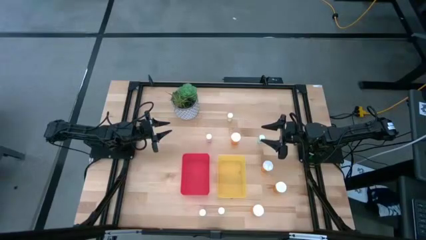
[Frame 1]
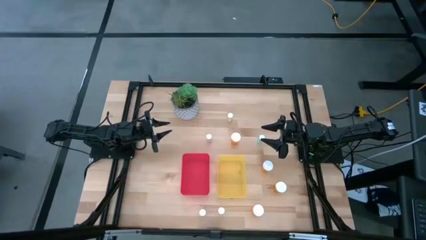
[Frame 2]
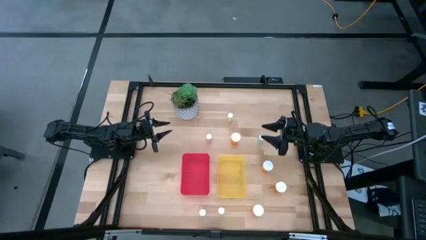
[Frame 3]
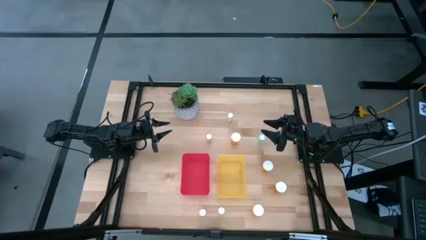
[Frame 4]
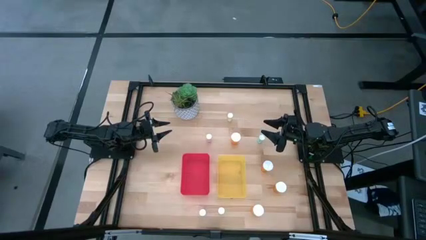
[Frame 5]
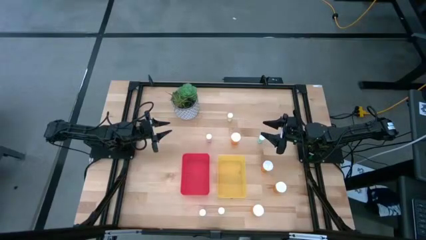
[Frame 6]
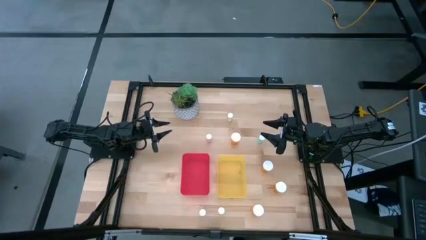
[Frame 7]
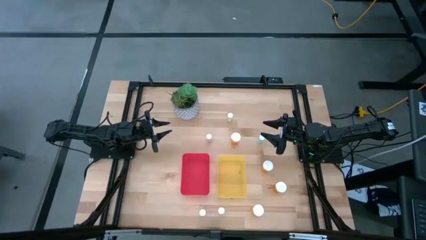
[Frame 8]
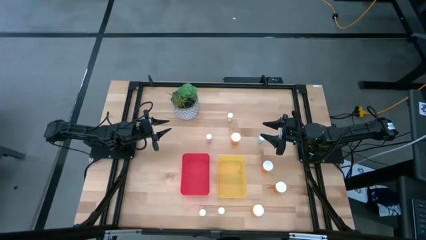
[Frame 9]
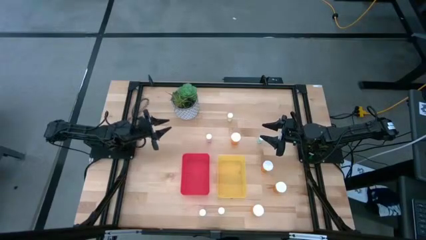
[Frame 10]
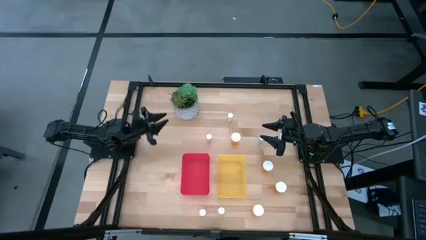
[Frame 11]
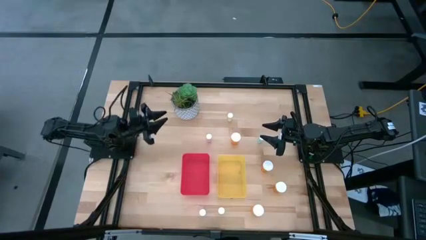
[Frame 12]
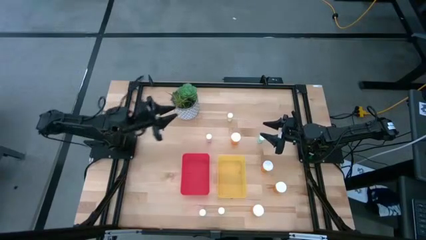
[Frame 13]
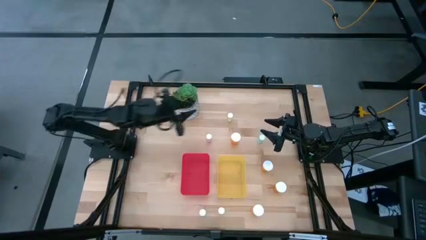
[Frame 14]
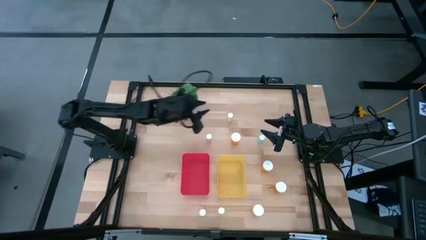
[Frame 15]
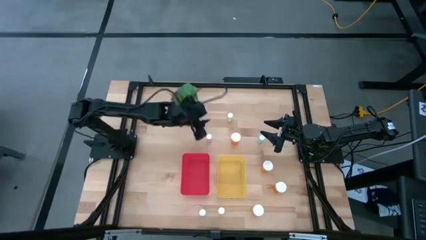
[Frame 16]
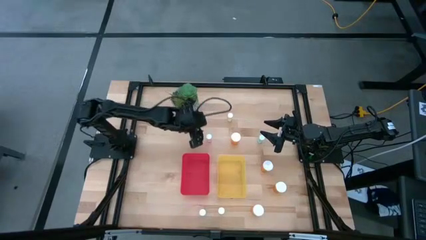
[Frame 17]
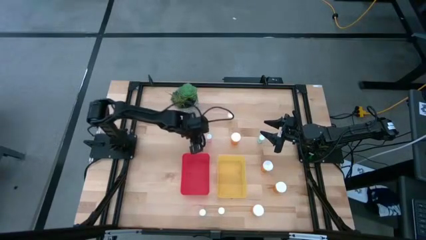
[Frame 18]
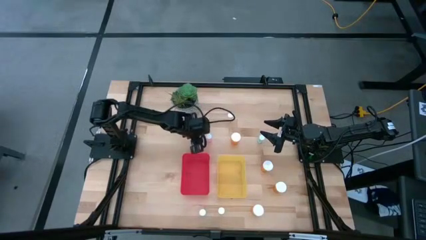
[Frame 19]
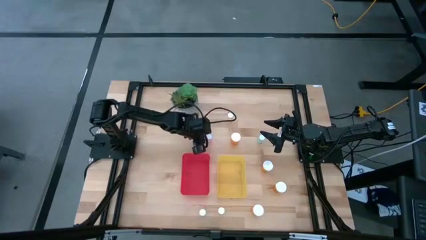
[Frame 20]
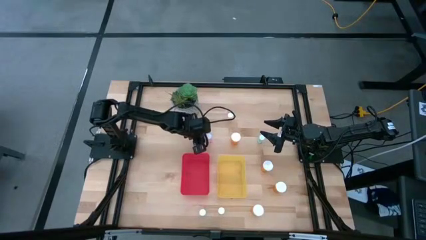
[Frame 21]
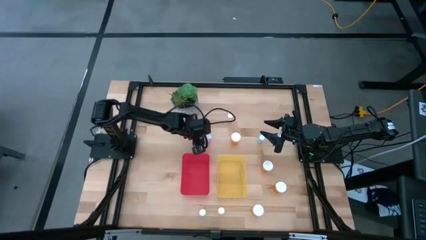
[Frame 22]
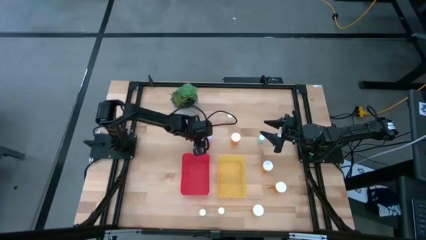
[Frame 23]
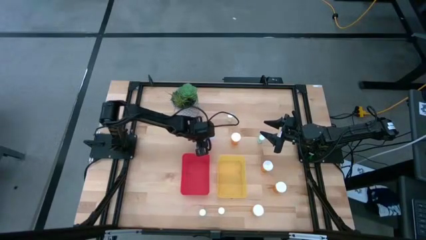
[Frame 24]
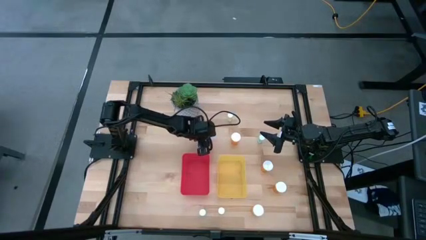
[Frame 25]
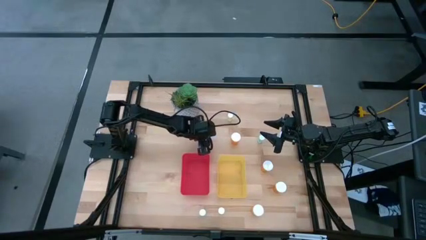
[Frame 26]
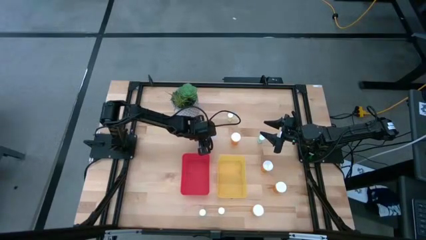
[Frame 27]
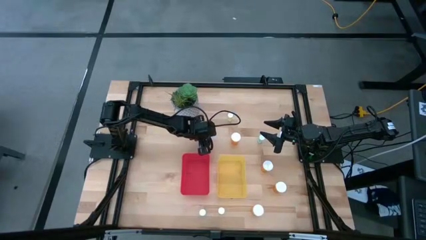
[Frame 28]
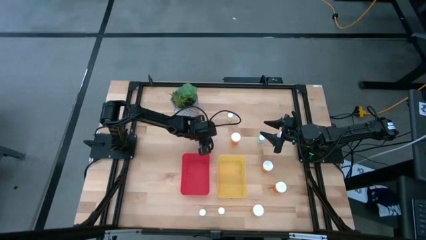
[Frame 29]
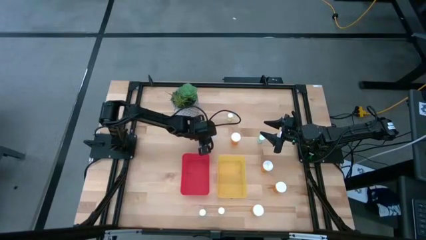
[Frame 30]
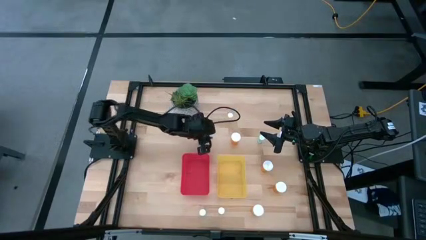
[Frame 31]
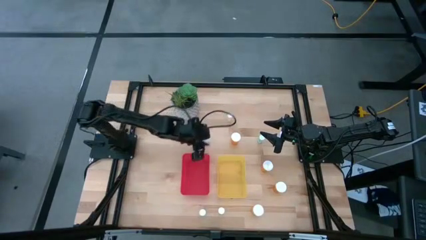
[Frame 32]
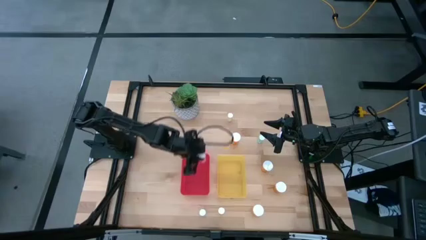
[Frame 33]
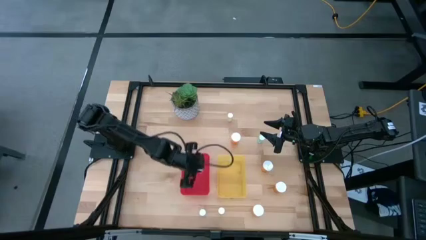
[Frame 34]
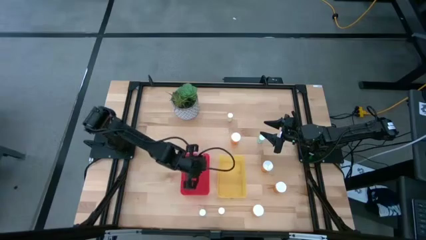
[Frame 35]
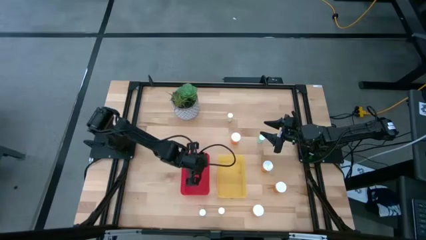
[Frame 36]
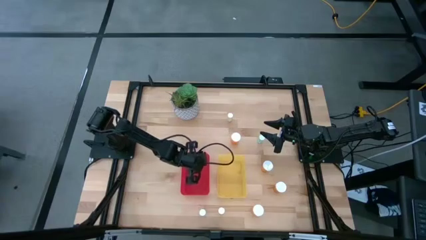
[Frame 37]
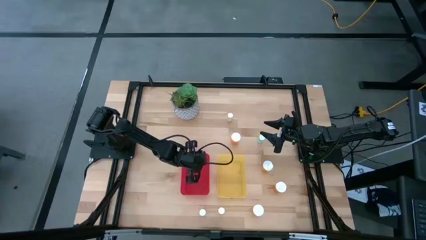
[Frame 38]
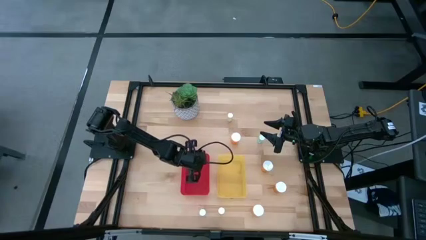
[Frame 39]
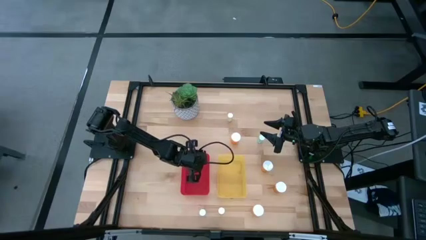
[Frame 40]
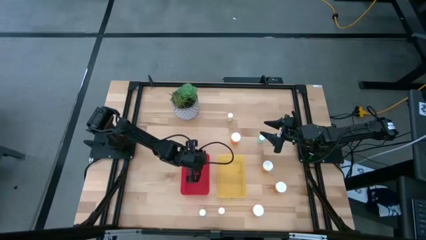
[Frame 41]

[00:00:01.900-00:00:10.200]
Task: Pick and place medicine bottles into bin by pill shape (circle, oval)
Put the pink tablet bottle into the red bin

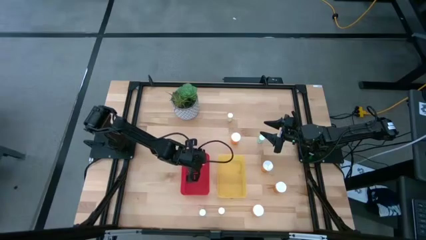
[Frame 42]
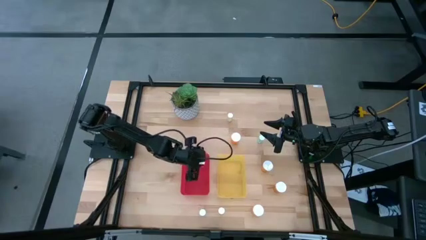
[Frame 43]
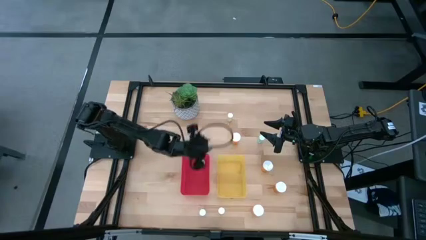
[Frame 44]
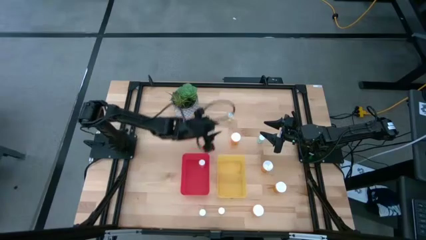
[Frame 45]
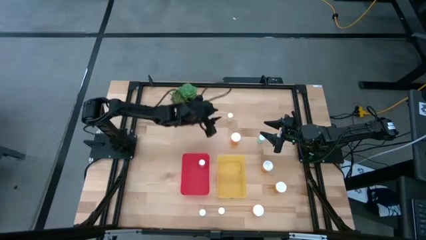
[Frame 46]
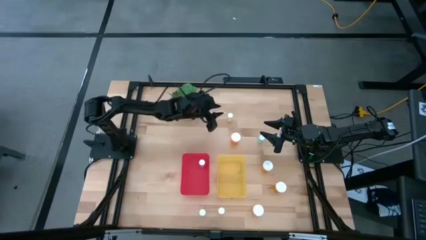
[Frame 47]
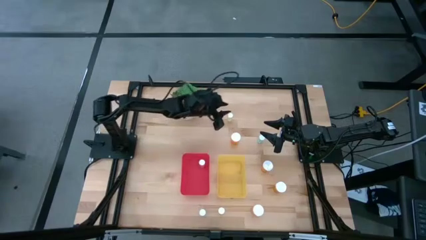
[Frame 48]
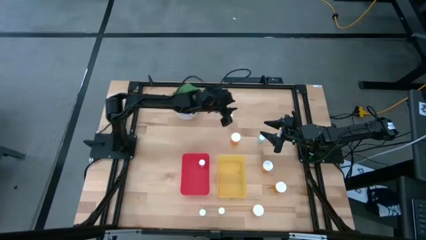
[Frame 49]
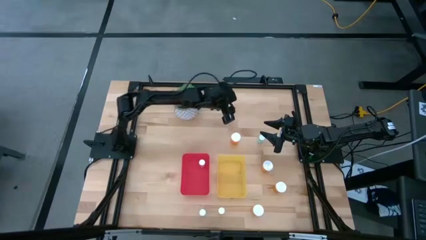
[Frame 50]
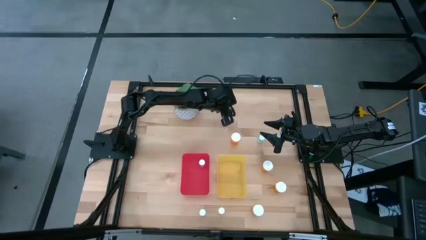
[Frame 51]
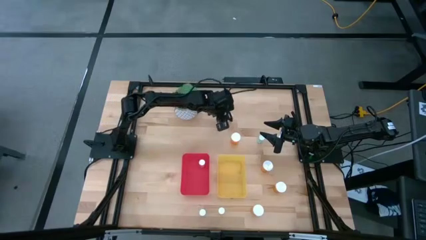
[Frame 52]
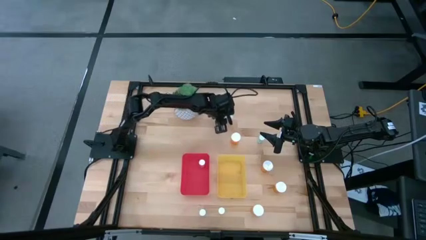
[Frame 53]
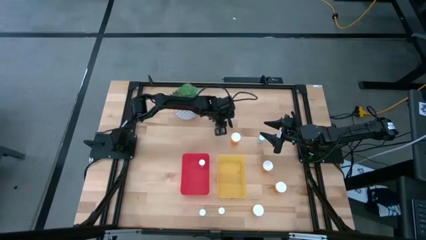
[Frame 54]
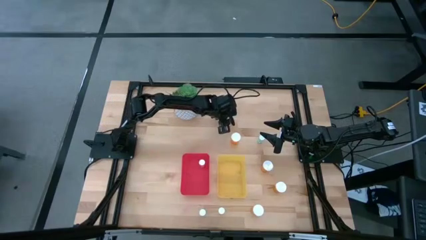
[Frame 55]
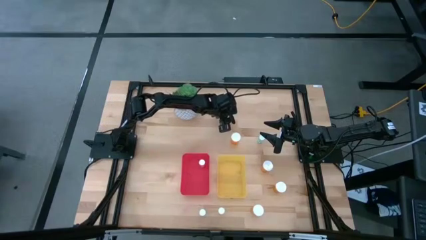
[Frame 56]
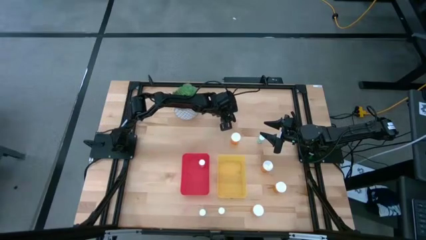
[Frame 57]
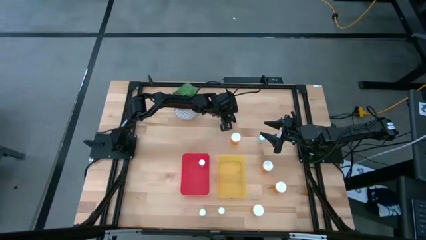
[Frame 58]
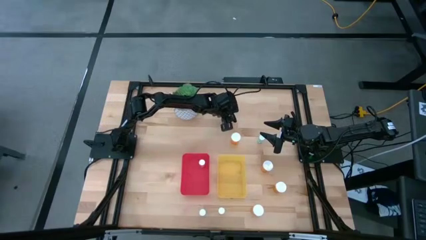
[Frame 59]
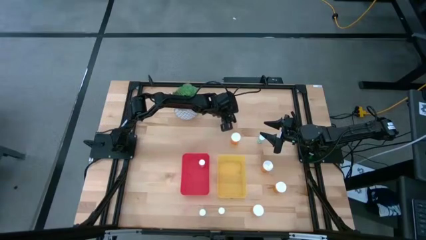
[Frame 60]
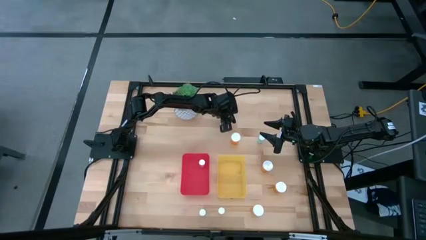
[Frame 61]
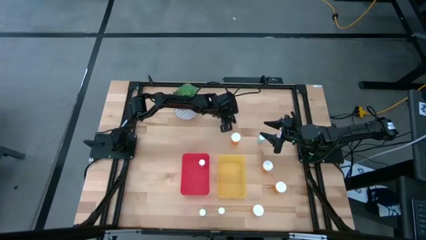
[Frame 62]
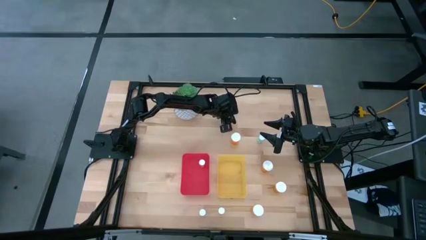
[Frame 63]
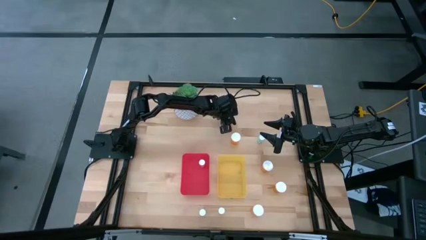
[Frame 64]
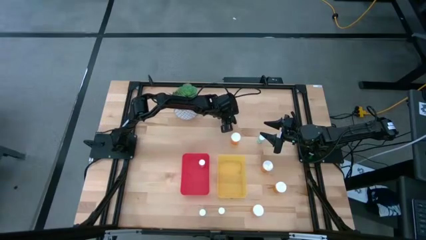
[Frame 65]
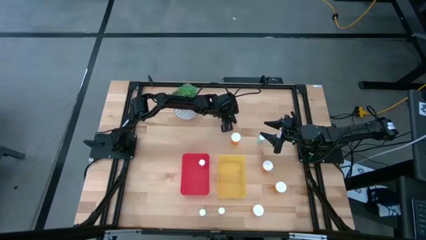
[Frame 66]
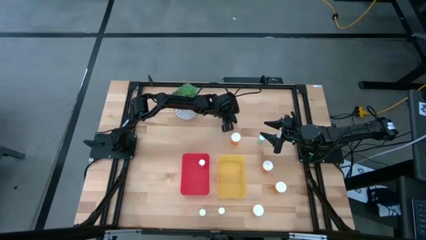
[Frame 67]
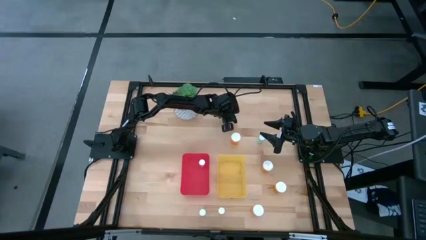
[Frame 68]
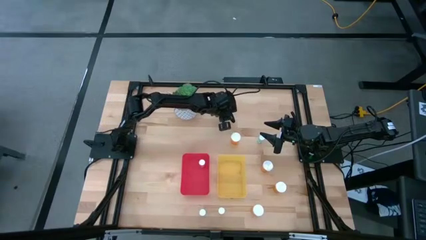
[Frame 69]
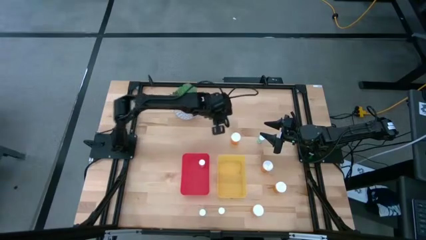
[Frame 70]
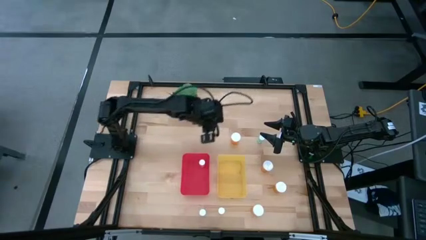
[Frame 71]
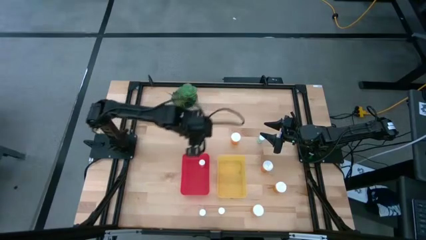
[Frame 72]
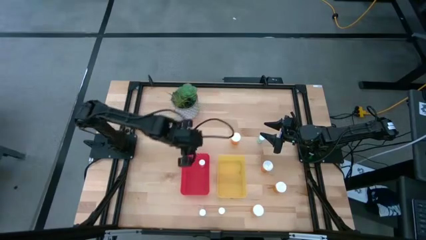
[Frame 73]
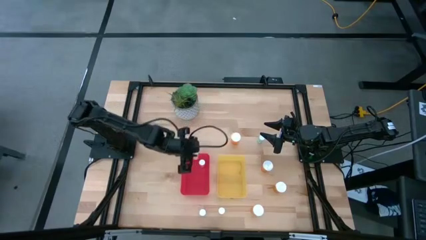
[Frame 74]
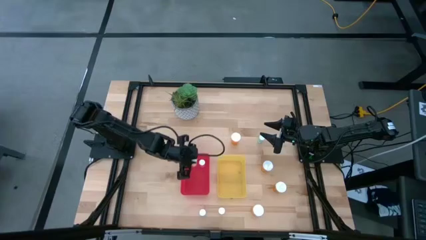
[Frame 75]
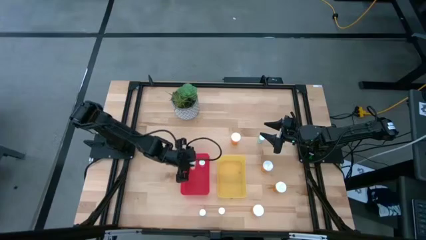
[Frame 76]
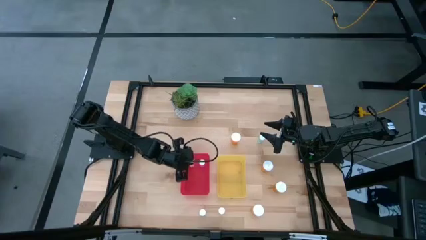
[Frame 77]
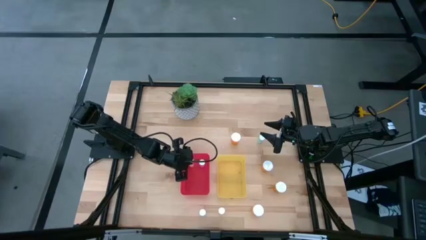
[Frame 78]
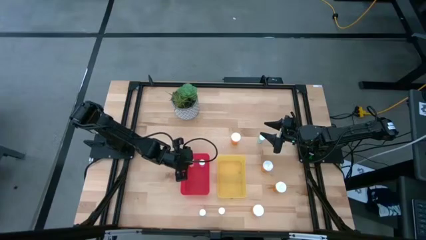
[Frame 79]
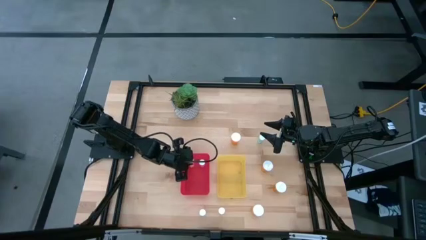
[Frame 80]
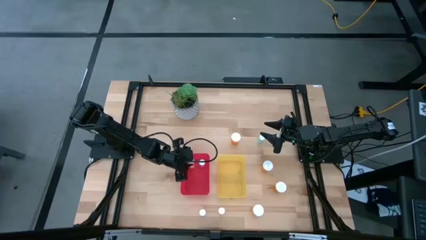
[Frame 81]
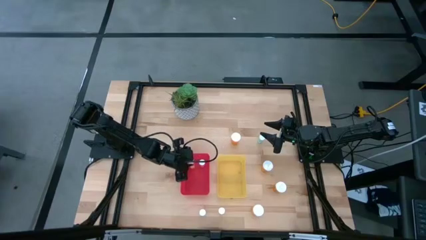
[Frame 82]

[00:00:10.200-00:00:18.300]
Put the yellow tablet bottle into the red bin
